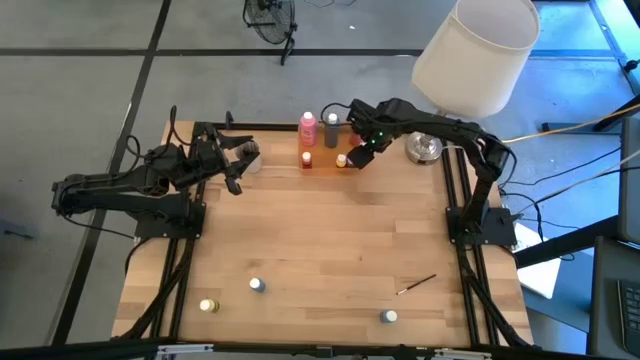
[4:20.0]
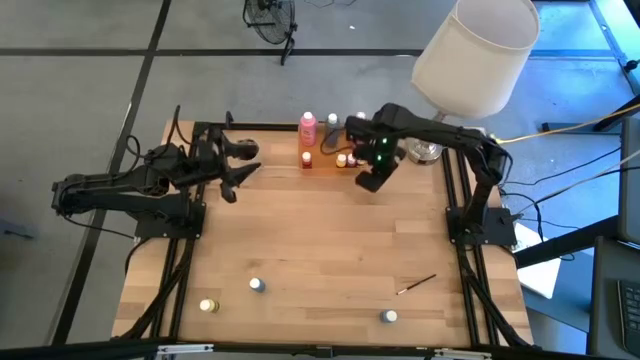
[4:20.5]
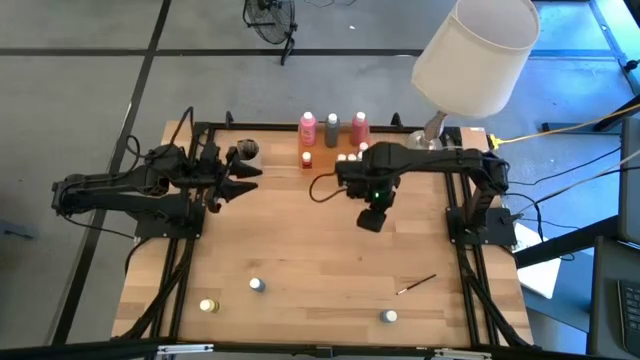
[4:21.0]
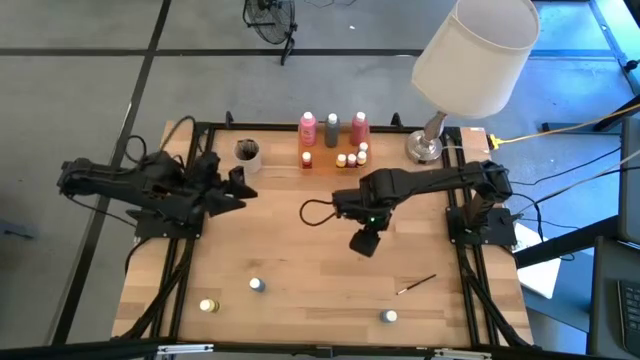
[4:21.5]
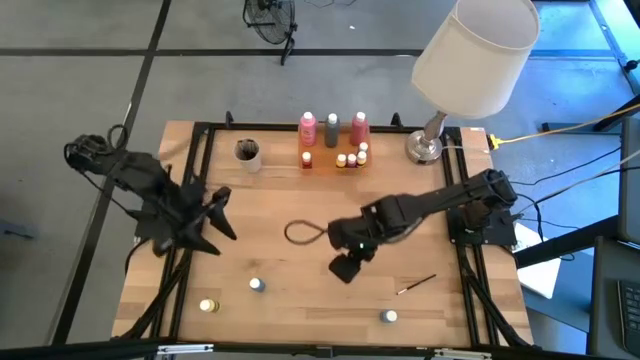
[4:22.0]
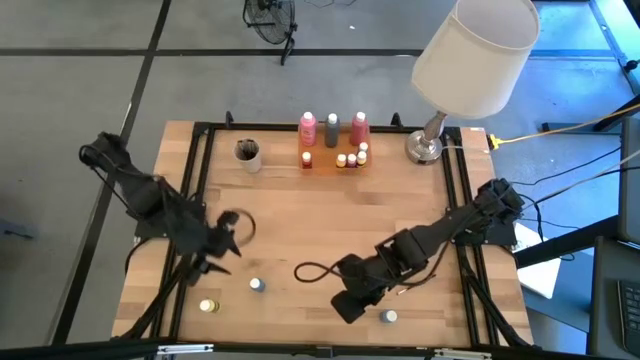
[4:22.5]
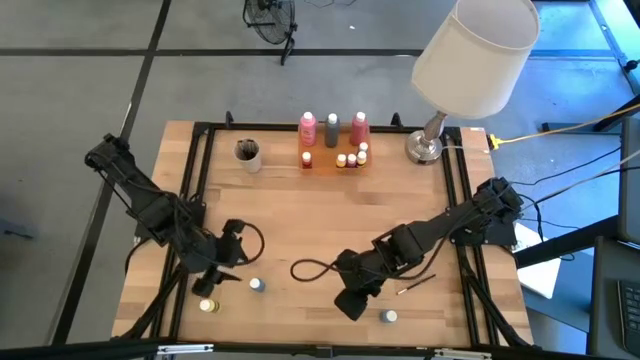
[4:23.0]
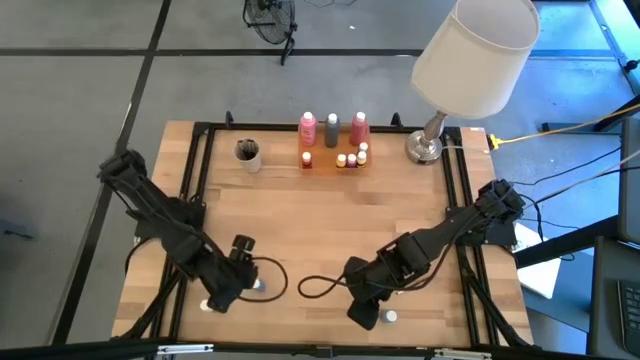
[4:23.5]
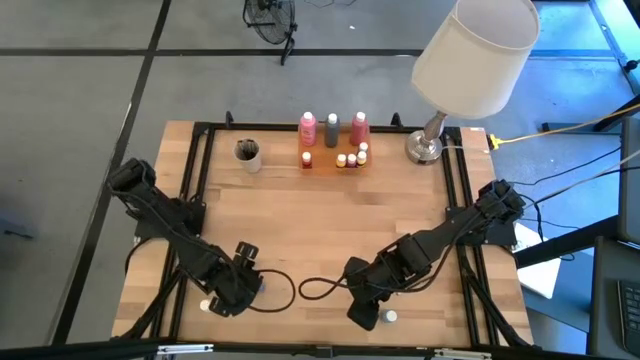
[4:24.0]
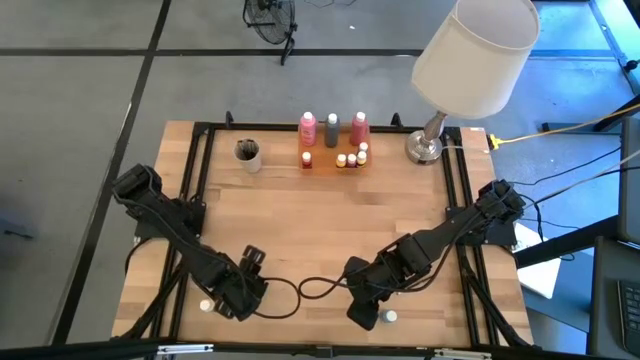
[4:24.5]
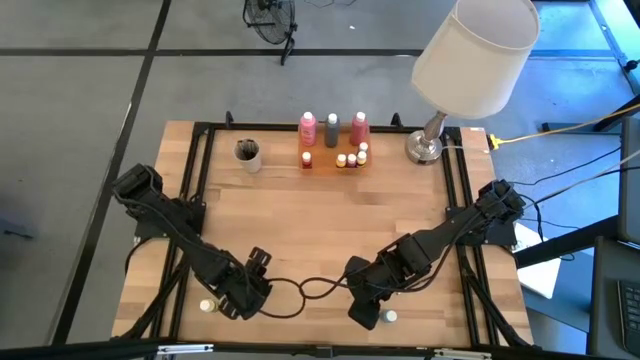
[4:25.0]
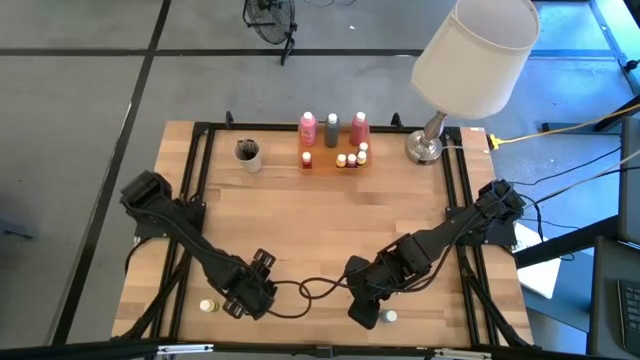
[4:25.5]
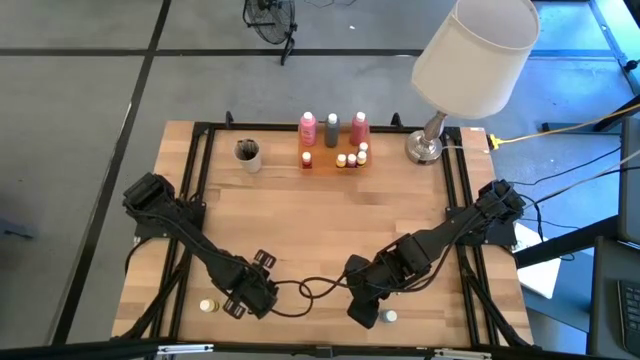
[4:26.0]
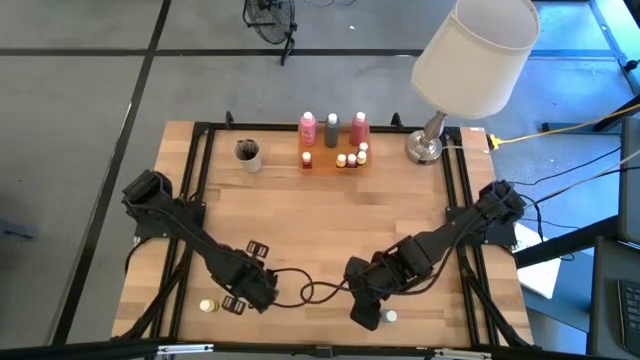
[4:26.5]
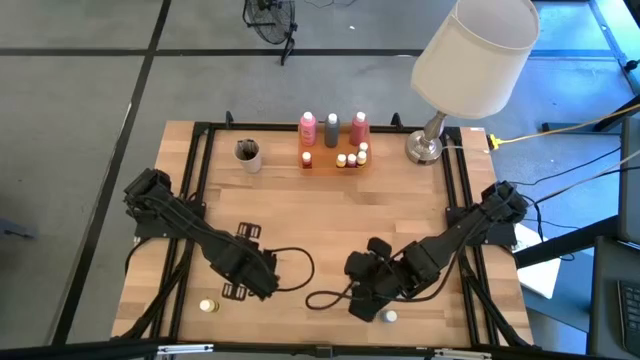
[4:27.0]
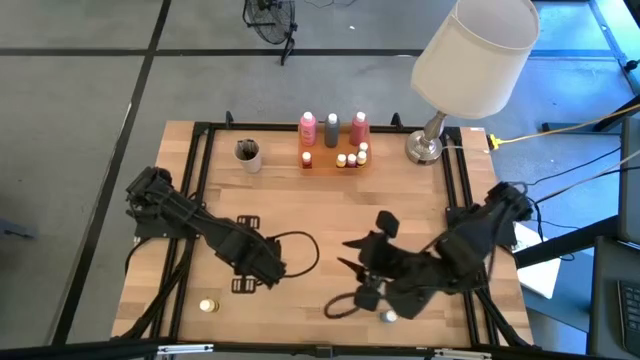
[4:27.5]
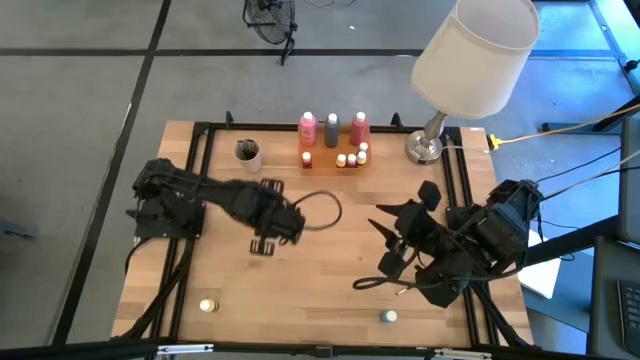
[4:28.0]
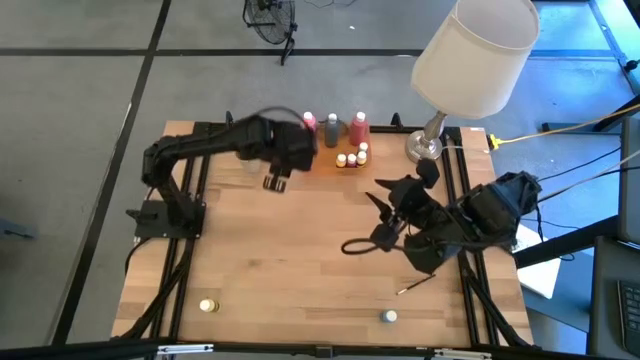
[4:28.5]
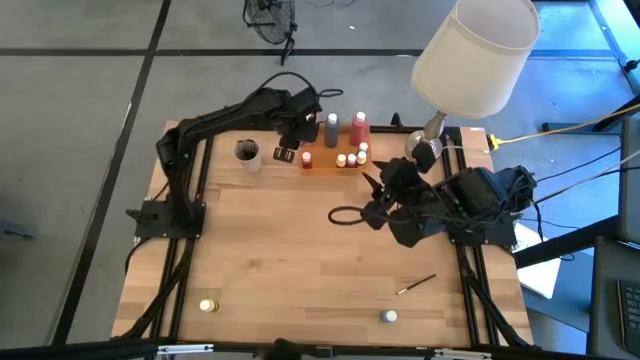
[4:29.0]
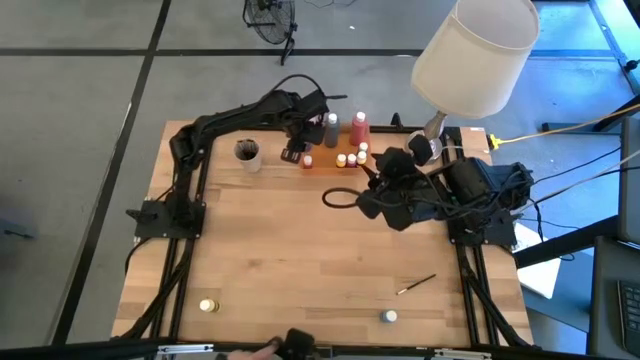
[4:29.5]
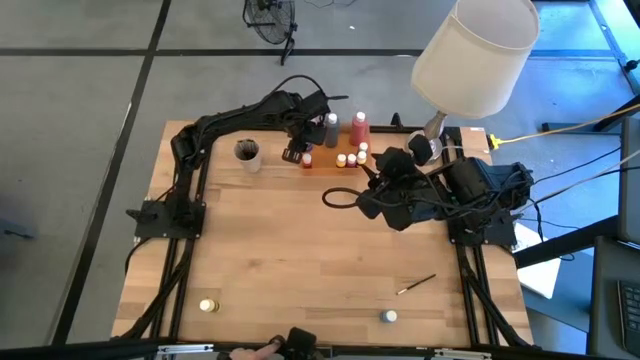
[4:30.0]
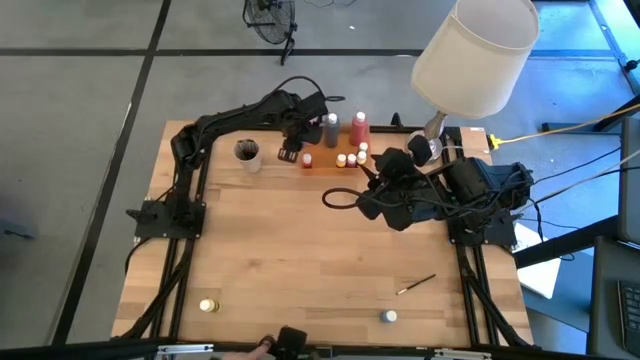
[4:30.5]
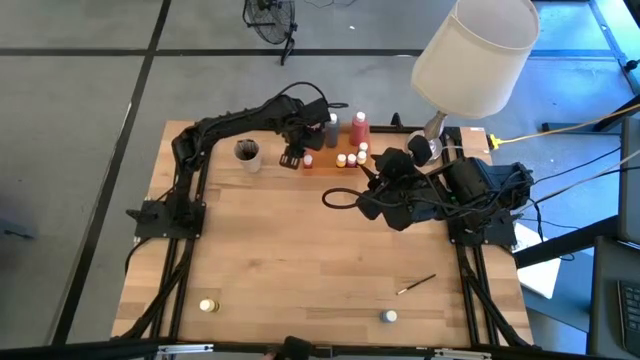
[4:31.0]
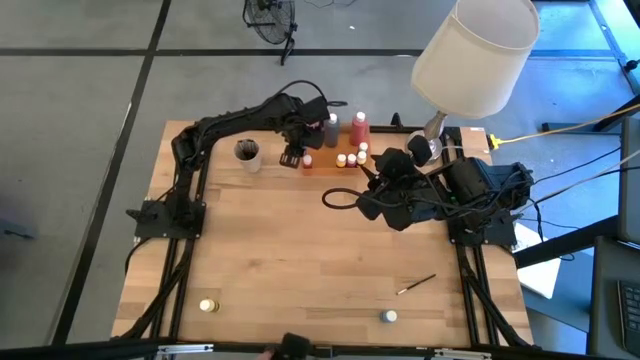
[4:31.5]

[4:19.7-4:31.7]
Task: Pick & Place Paint Supplies
Put the blue paint bottle into the orange bin

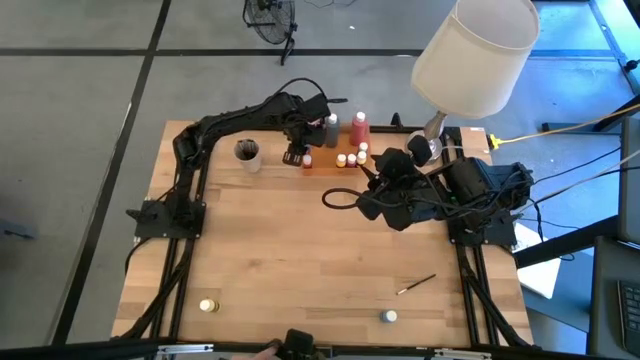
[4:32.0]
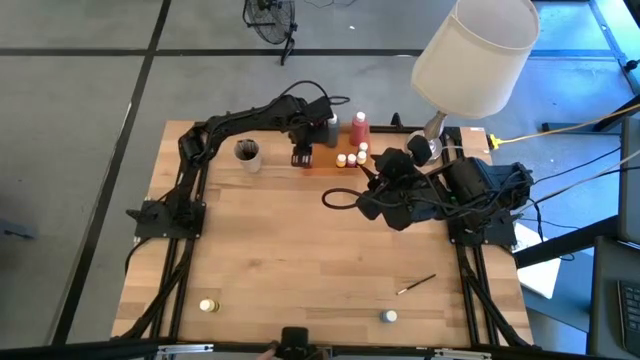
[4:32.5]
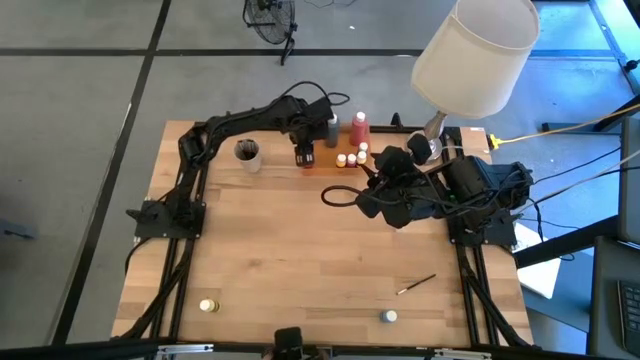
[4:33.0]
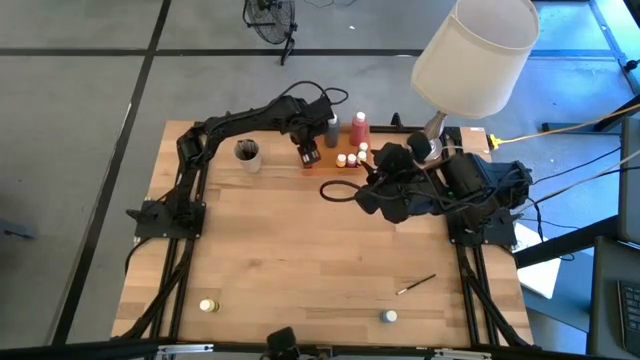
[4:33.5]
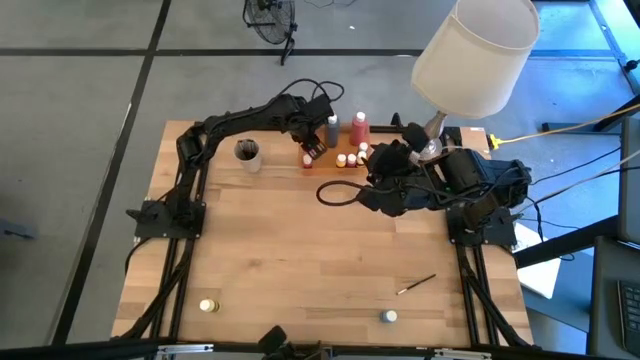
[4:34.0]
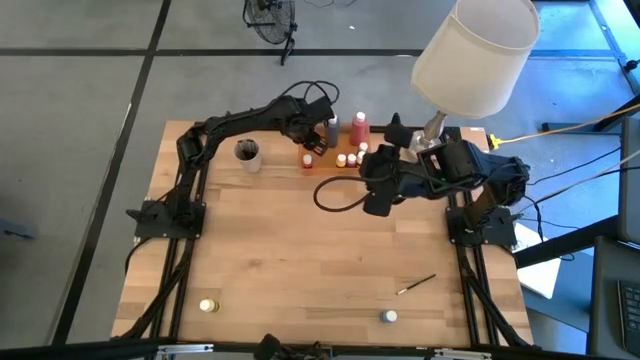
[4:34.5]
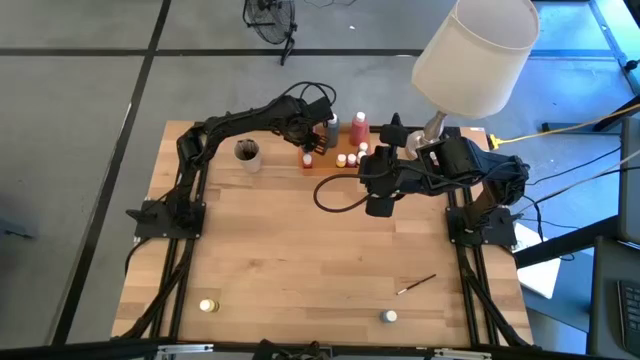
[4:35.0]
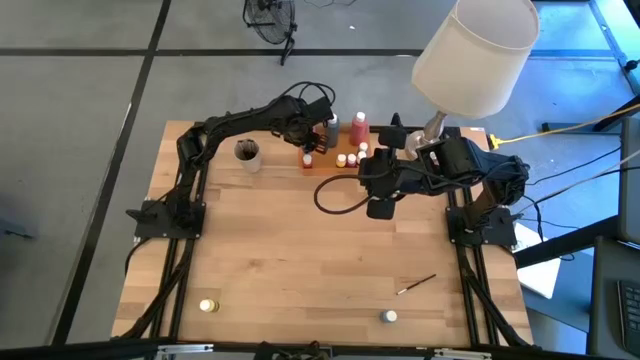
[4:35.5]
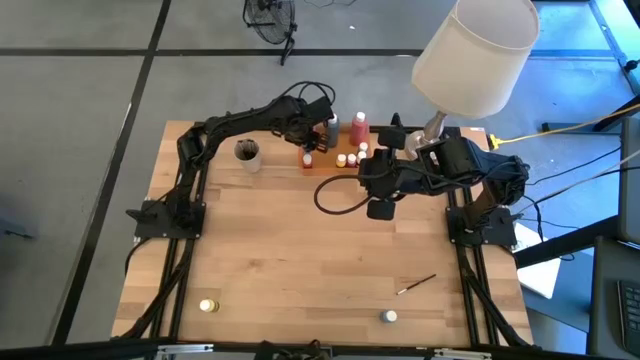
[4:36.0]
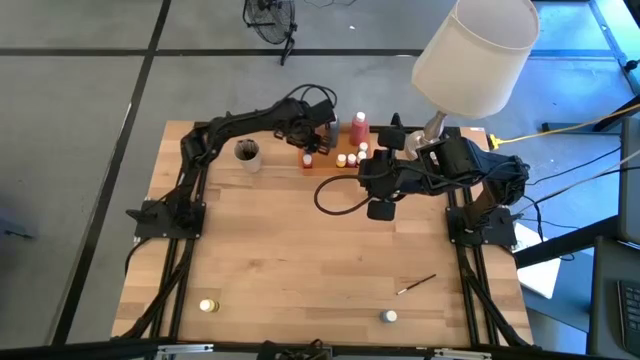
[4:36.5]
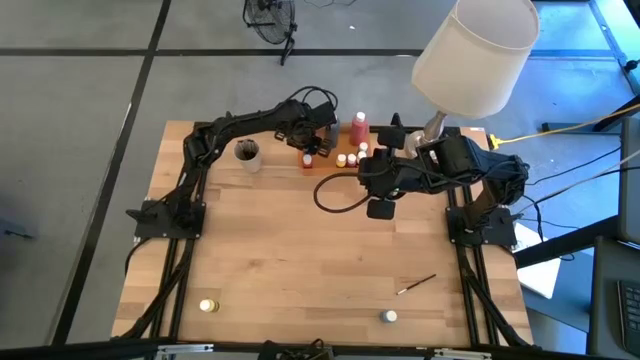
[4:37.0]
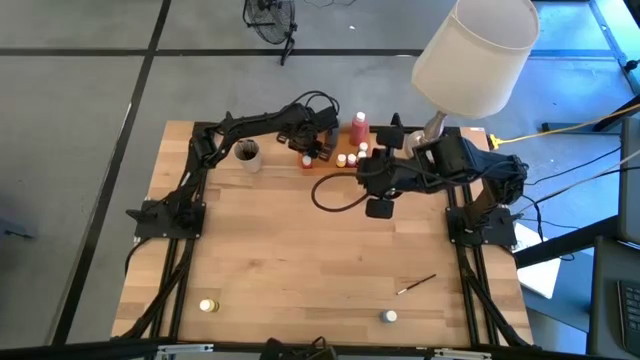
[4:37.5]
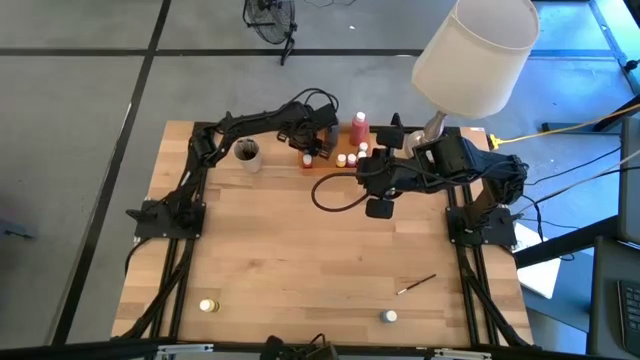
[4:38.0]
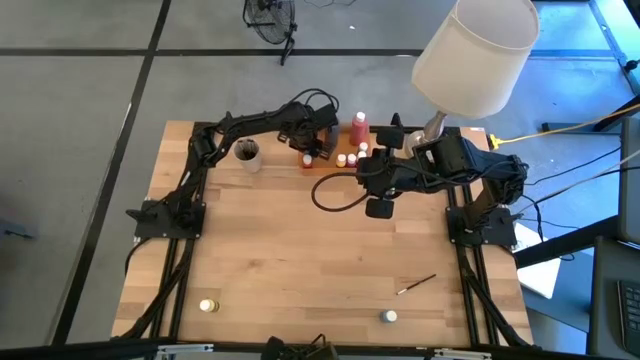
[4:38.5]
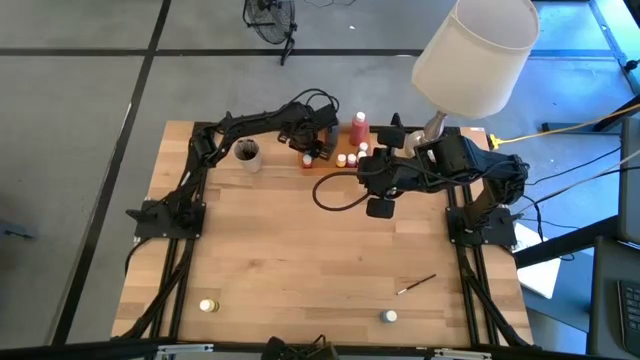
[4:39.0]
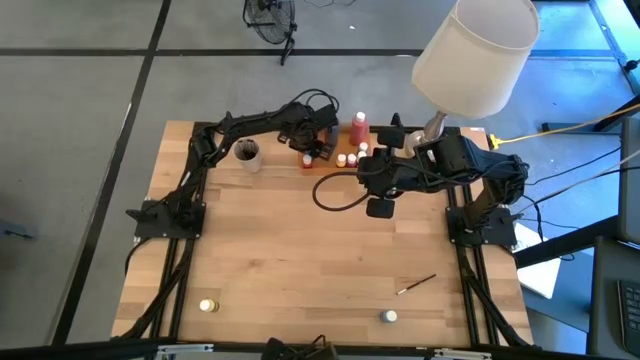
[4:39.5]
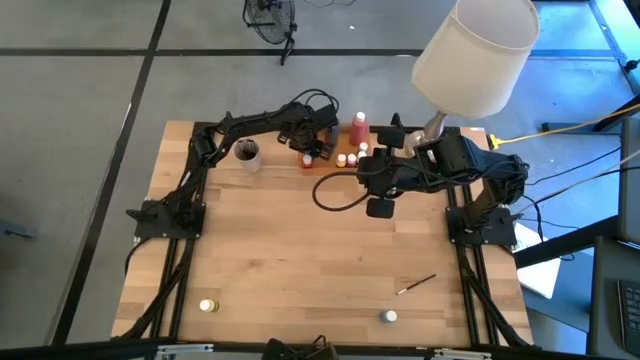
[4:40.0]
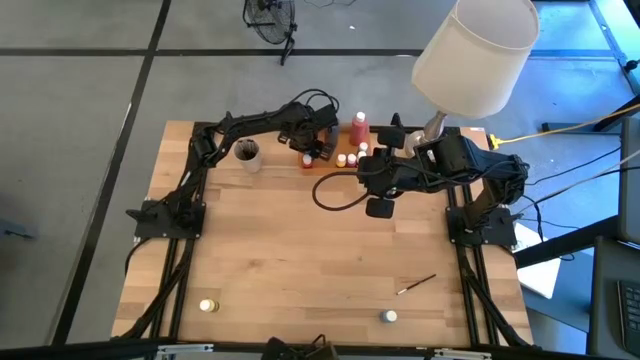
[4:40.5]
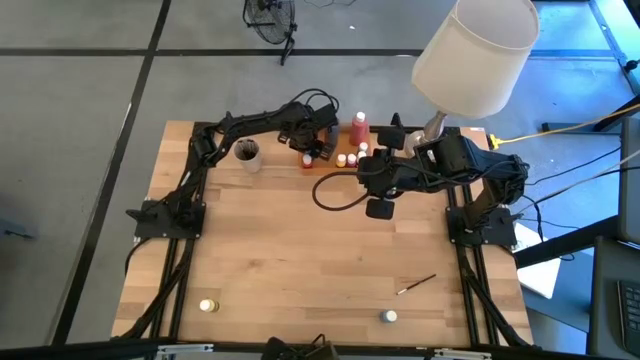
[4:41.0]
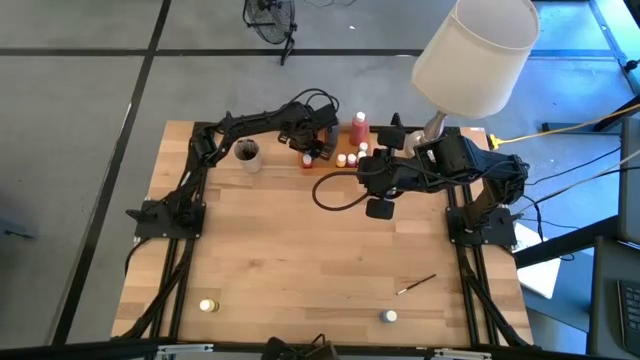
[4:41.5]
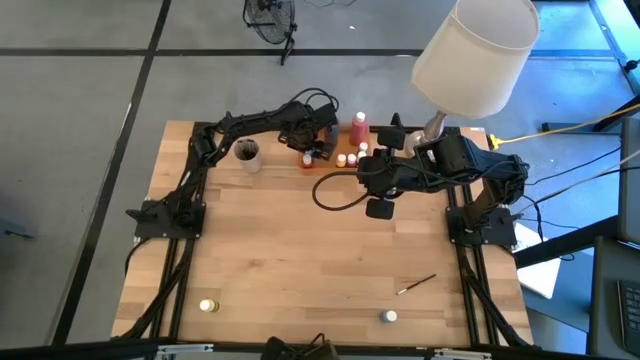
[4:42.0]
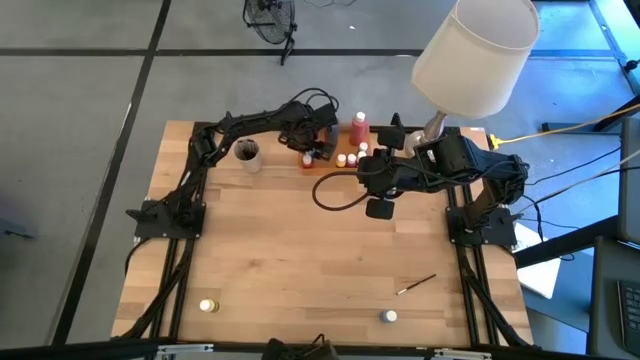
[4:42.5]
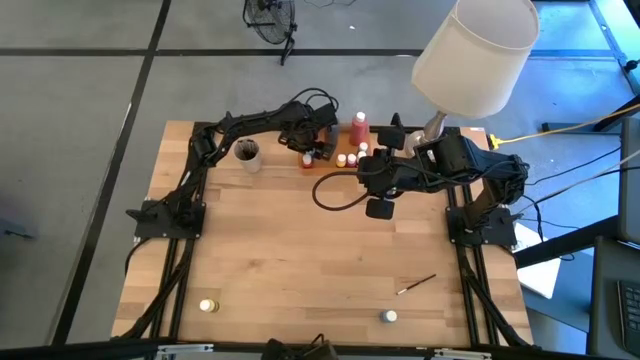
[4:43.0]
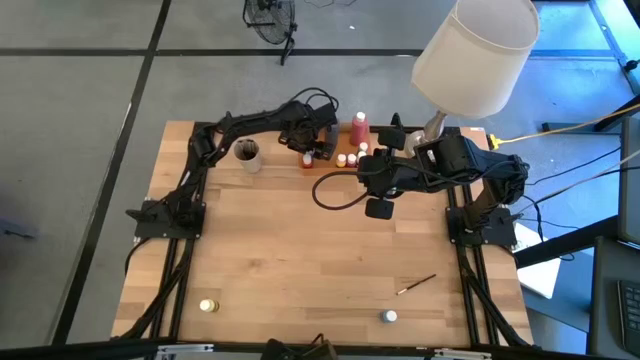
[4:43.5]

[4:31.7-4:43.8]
Put the blue paint bottle into the orange bin
